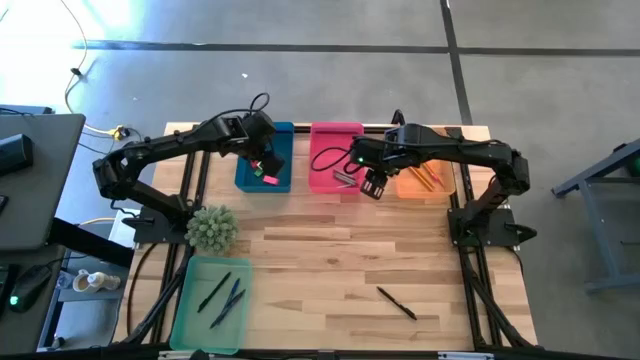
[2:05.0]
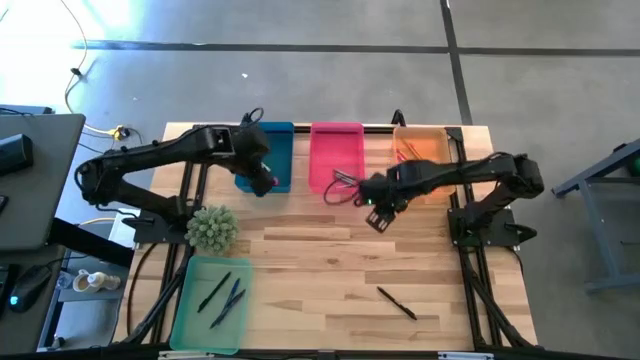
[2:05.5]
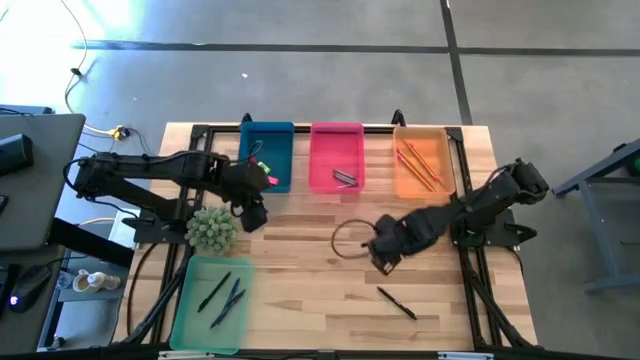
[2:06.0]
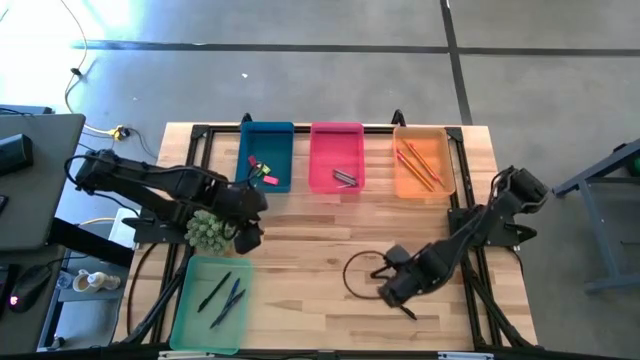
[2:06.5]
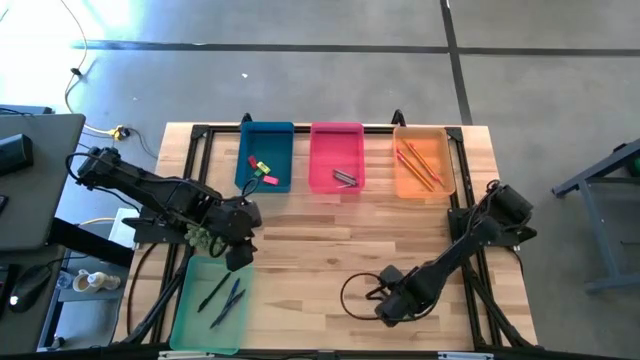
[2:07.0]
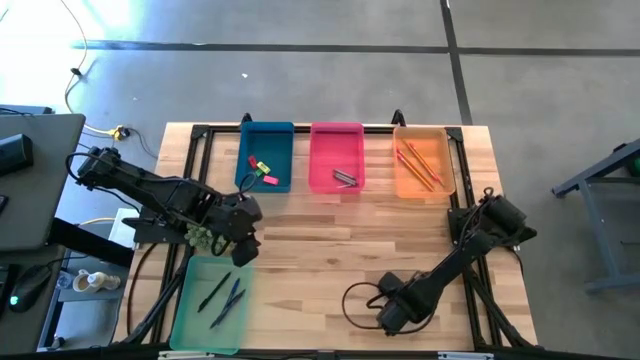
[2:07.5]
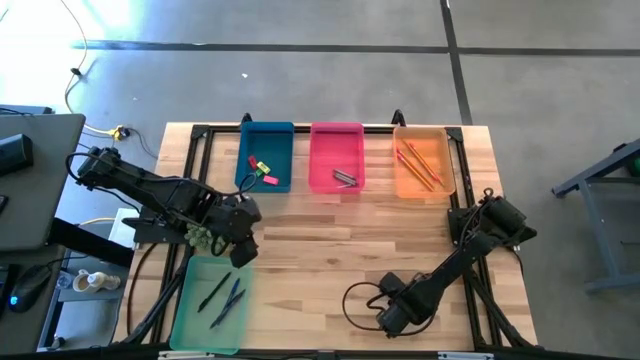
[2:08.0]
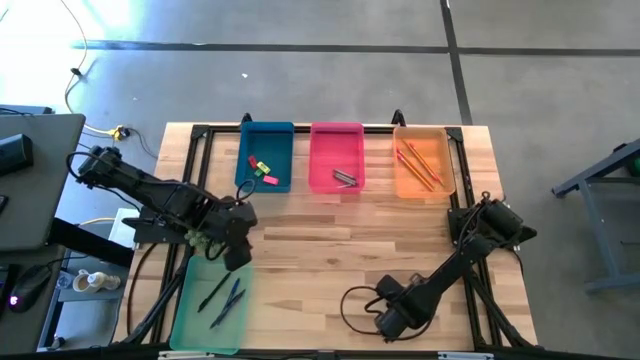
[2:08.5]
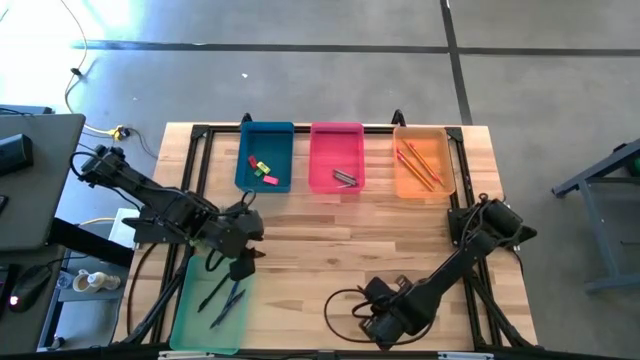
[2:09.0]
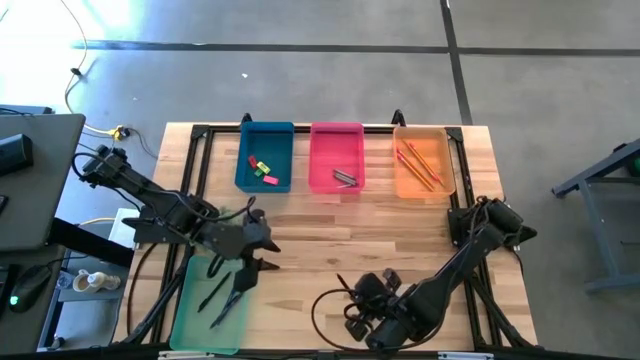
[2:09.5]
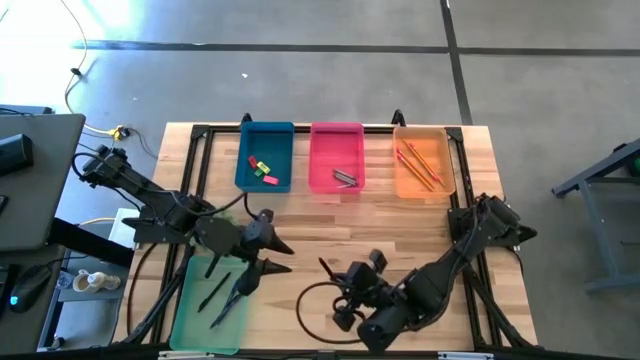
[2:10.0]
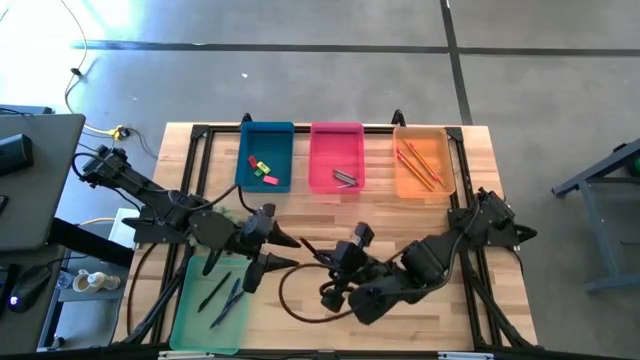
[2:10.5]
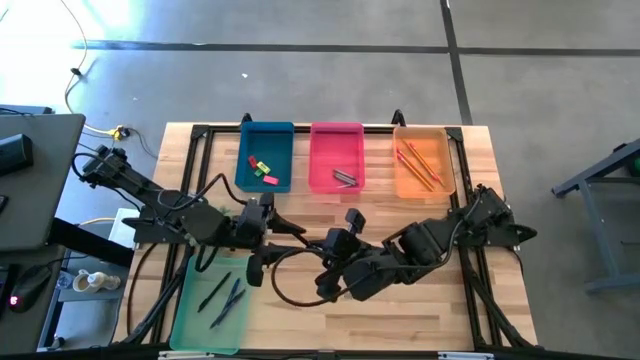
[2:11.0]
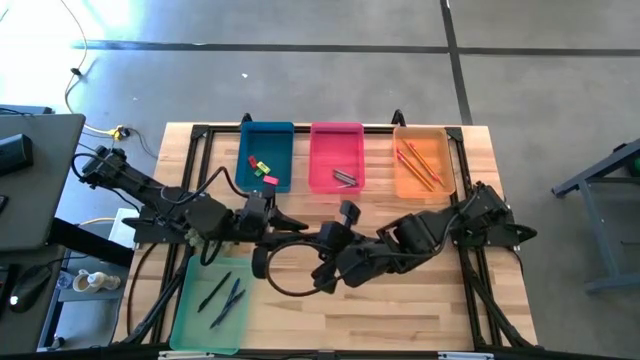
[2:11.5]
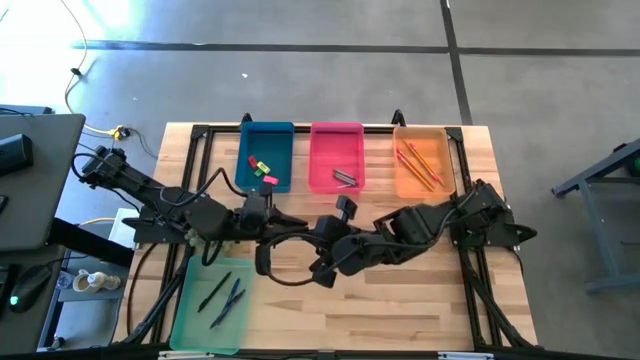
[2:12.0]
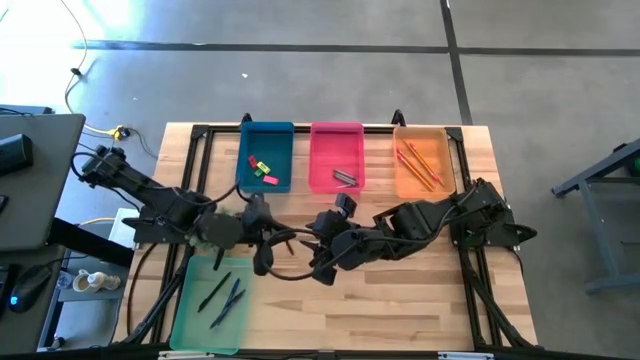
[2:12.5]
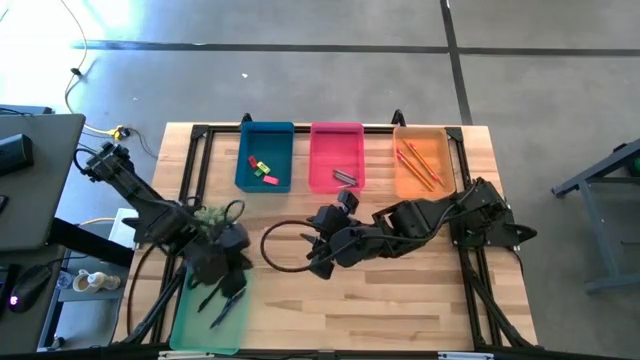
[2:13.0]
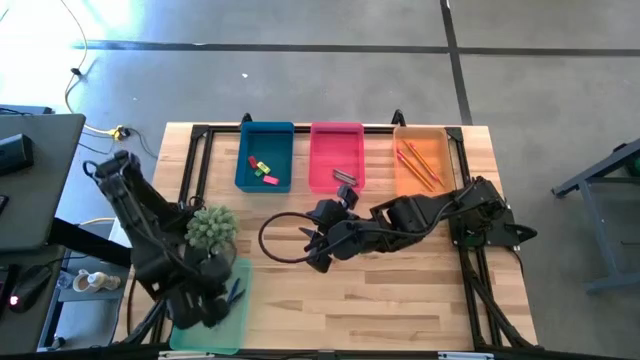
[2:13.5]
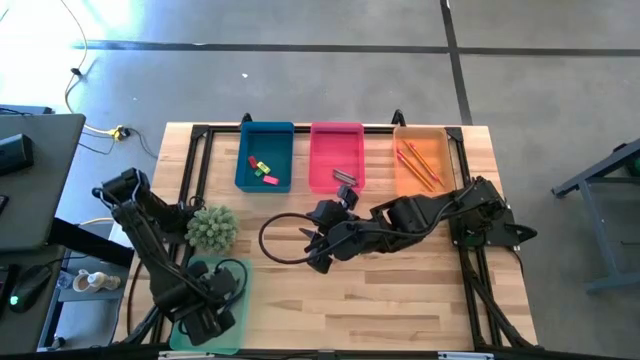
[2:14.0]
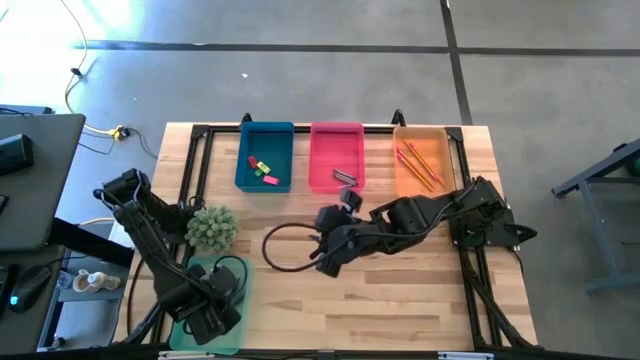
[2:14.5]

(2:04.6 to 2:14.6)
Task: Sort crayons/erasers/pens/pencils in bins
Put the black pen into the blue bin

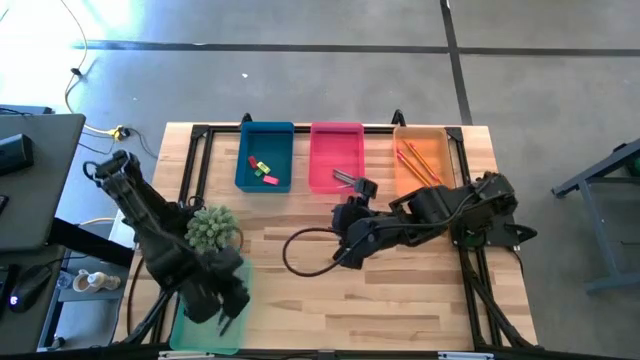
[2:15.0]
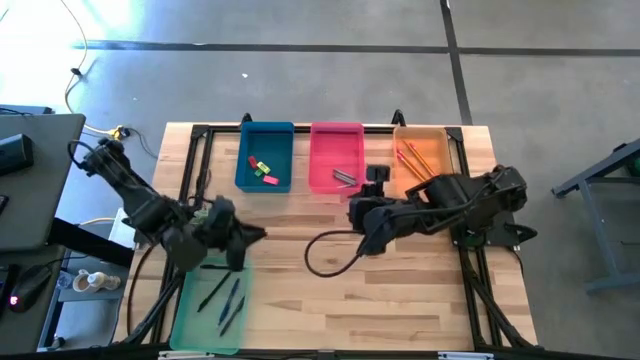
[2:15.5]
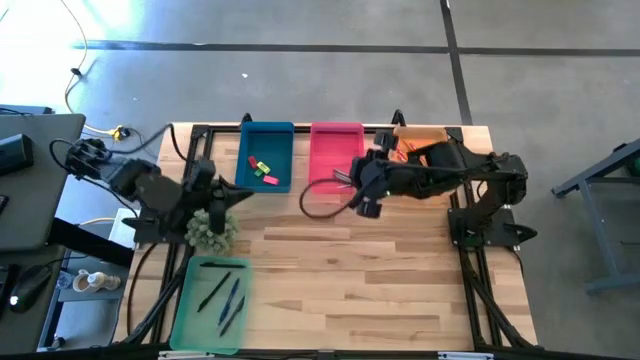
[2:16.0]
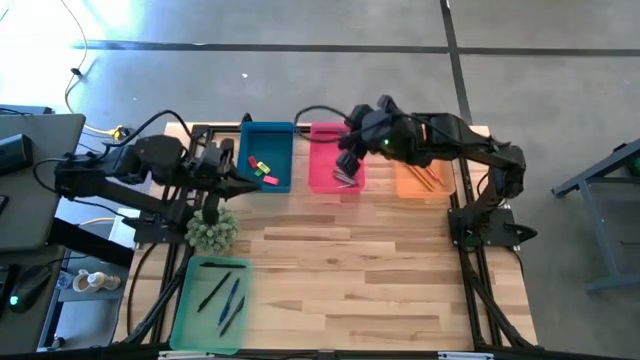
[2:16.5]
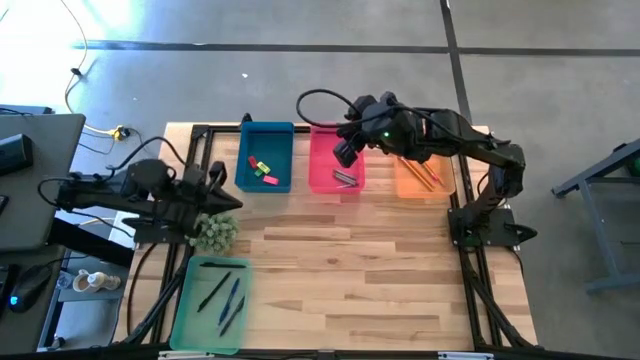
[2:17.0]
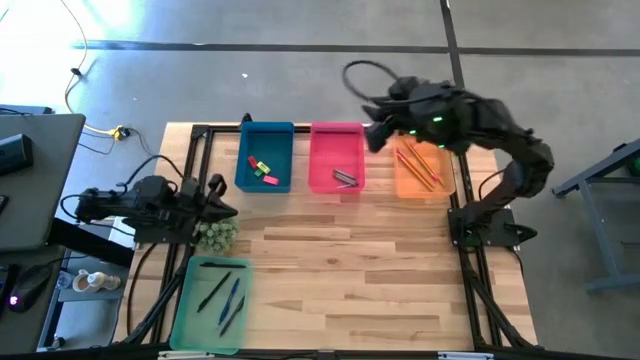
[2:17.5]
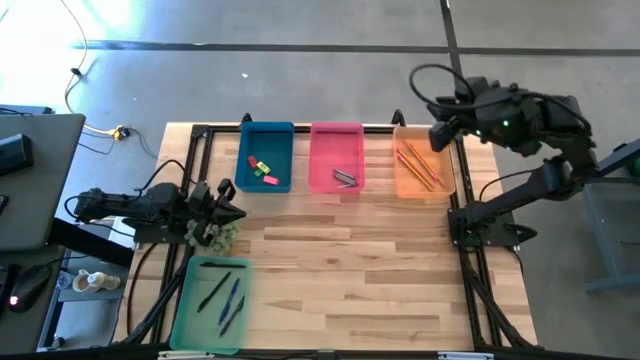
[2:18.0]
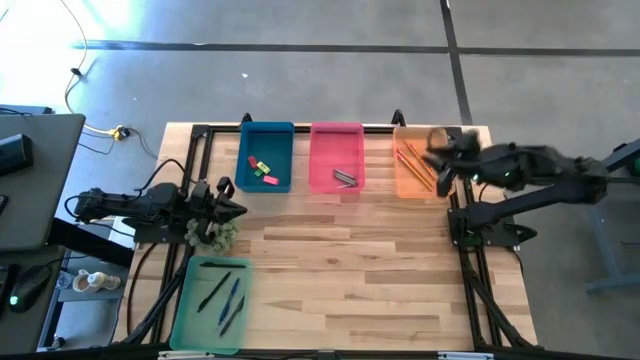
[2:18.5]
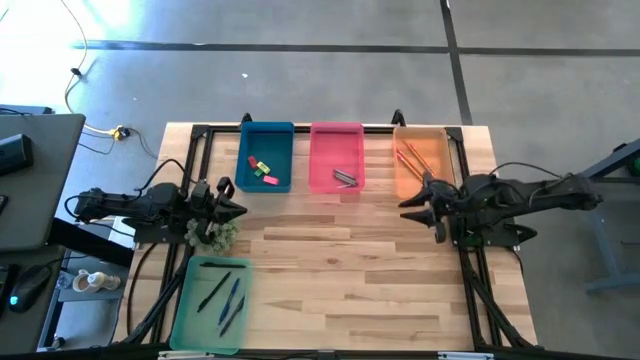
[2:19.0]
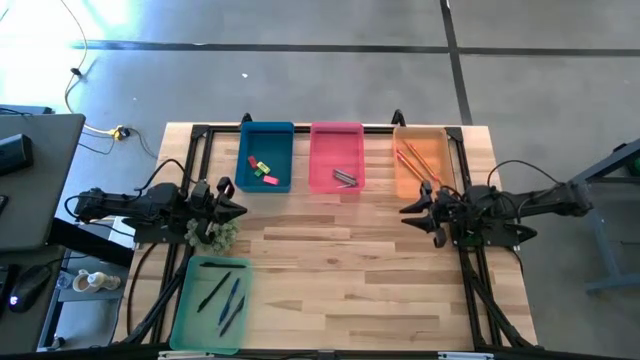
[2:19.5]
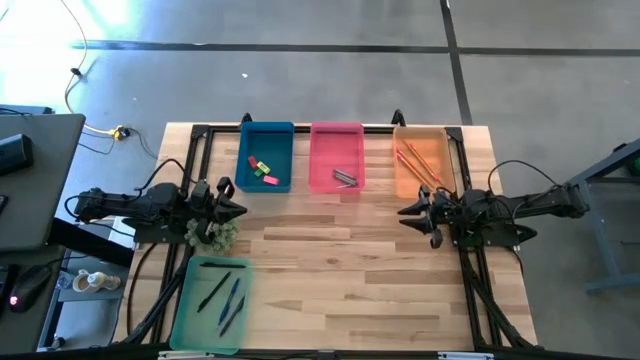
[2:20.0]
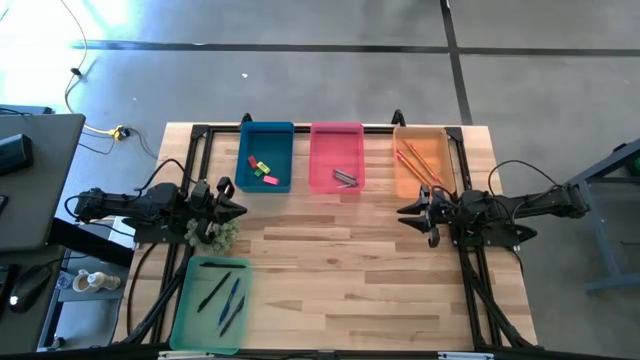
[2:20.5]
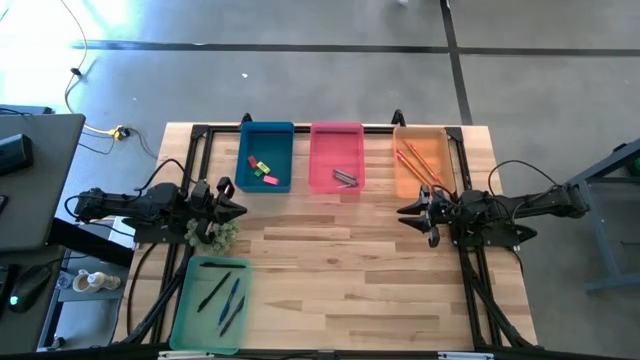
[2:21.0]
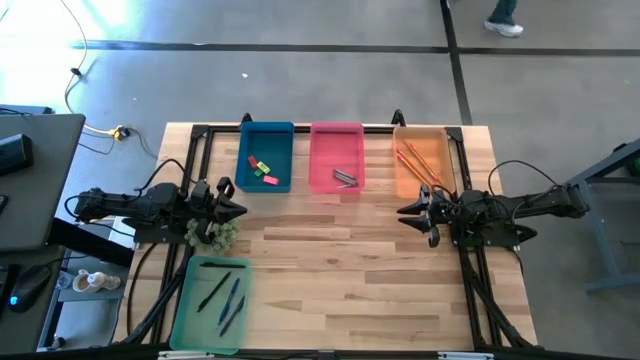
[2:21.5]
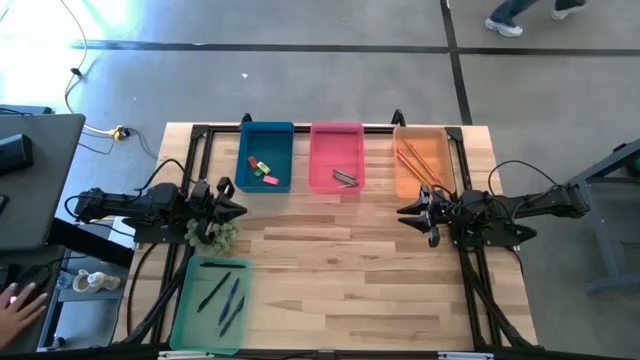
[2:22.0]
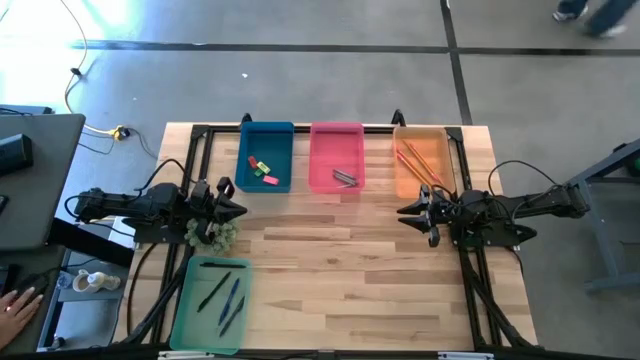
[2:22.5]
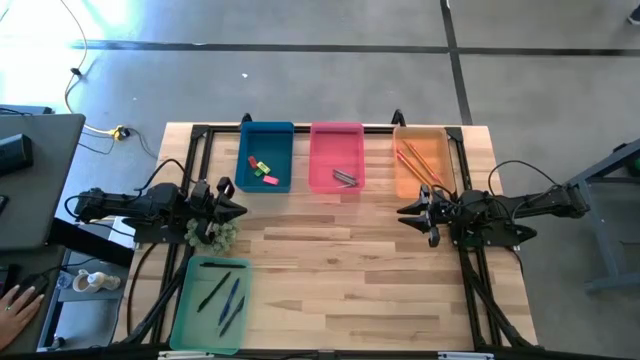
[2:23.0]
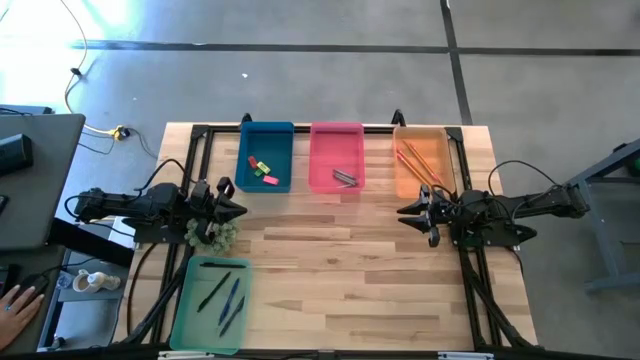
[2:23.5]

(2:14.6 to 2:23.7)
Return to Home Position

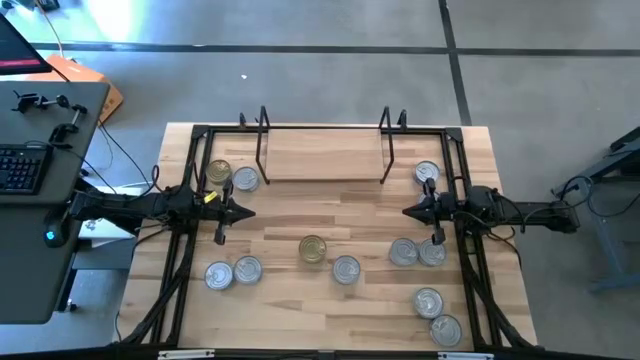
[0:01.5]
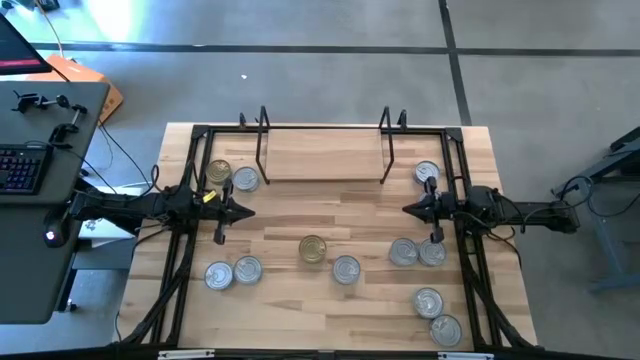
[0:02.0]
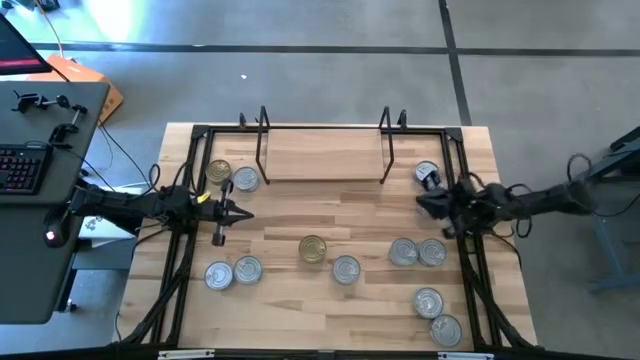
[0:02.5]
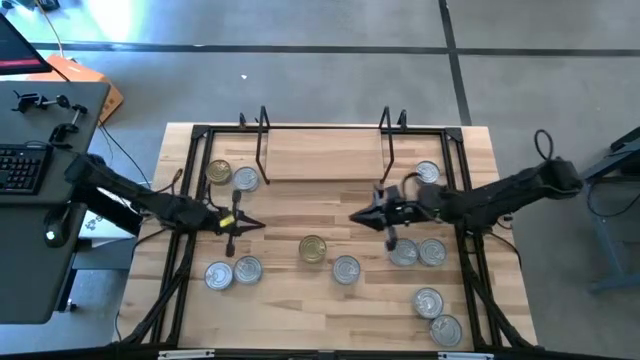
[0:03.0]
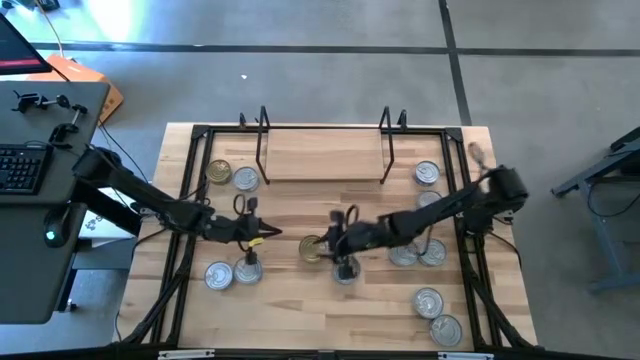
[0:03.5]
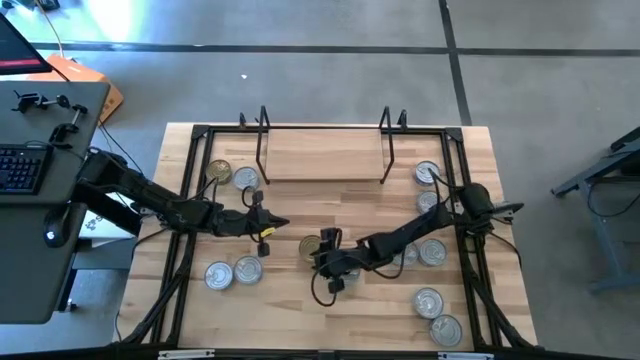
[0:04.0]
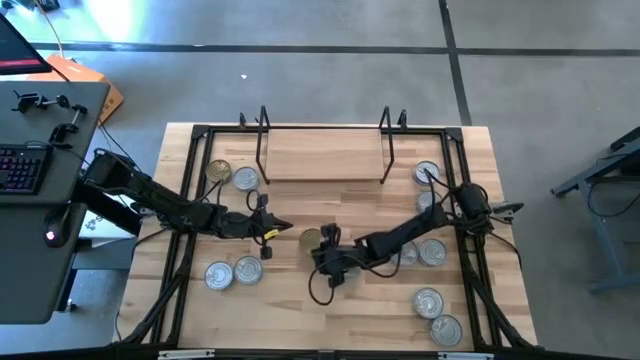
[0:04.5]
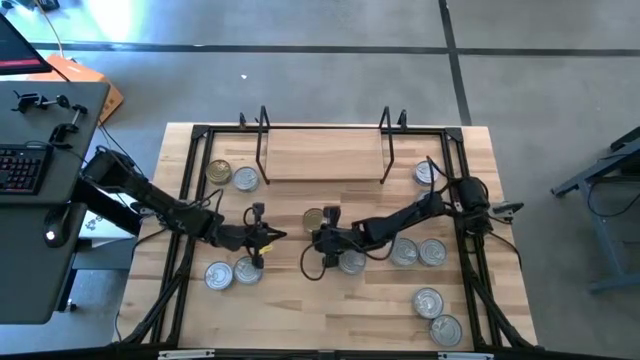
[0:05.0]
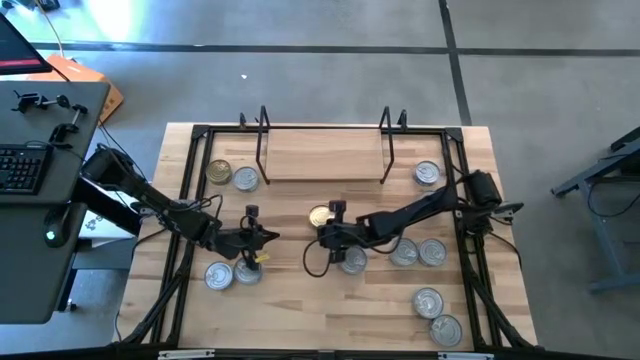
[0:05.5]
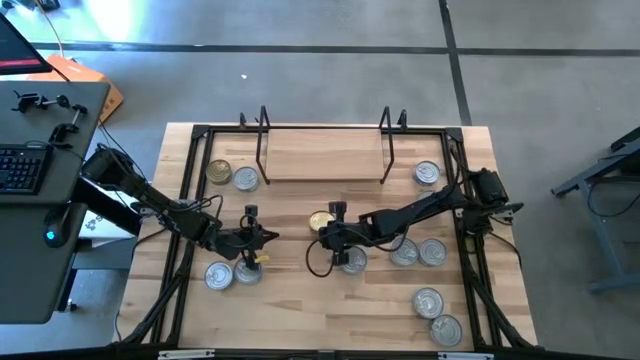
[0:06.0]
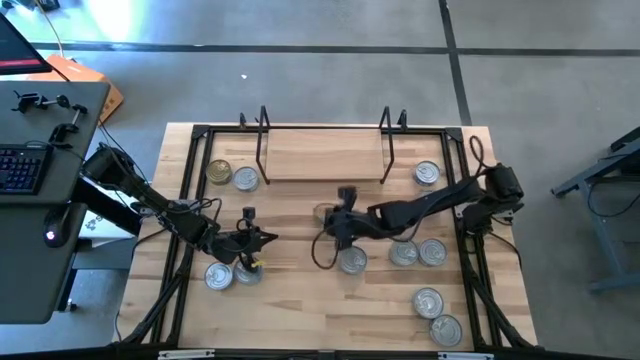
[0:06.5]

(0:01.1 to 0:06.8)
Task: Stack canned seafood by type on shelf
Put the light green tuna can on the shelf
